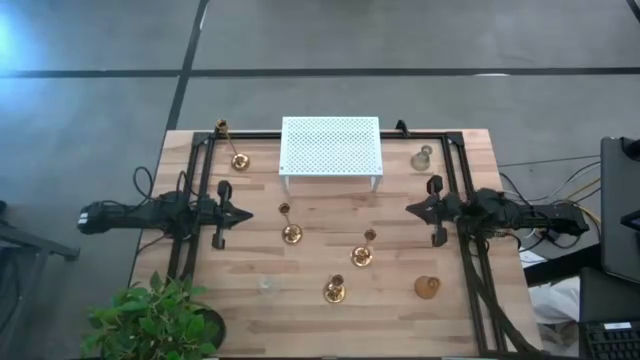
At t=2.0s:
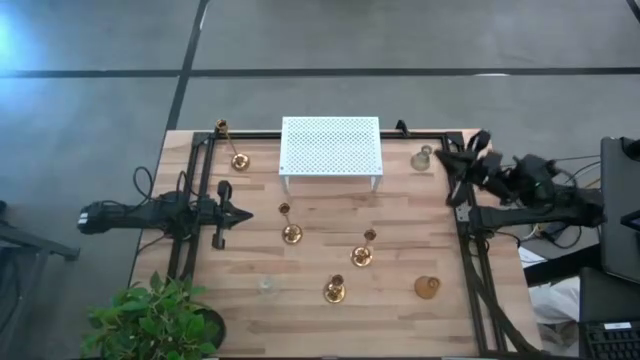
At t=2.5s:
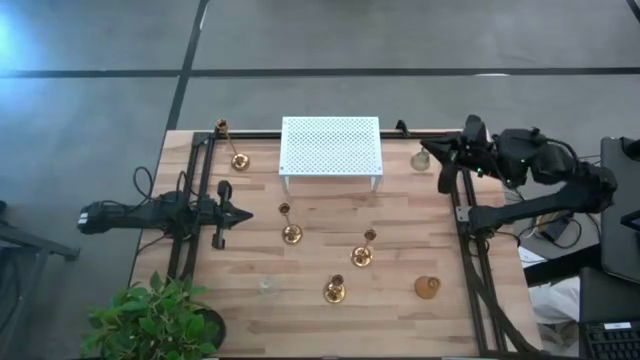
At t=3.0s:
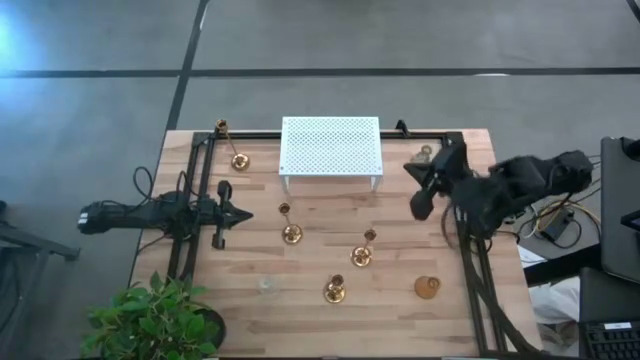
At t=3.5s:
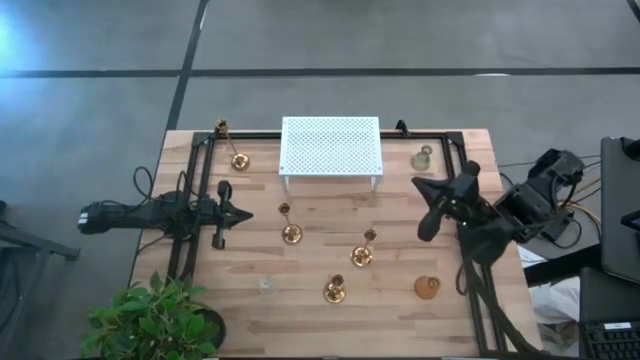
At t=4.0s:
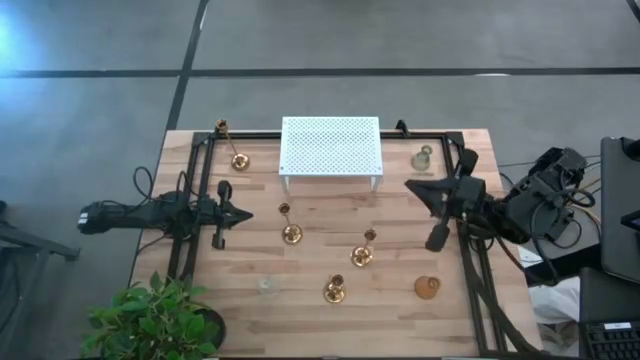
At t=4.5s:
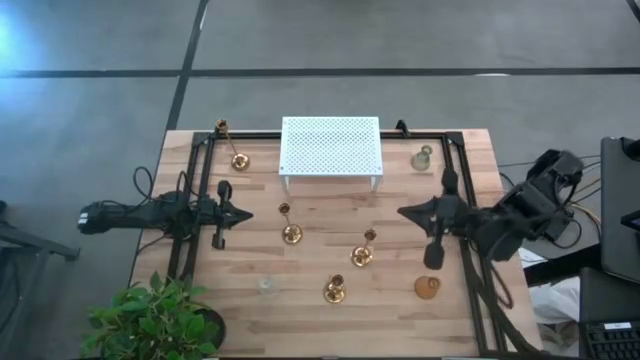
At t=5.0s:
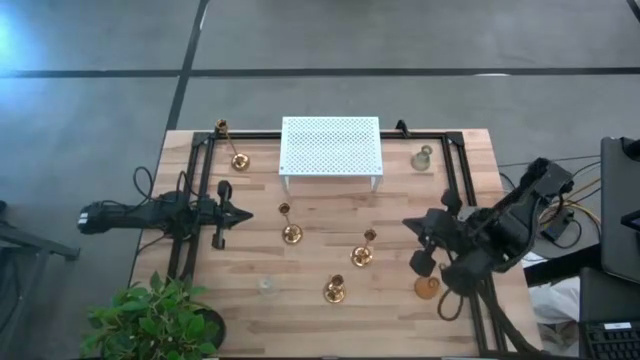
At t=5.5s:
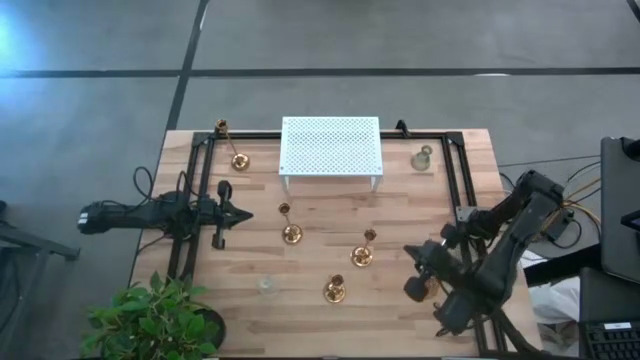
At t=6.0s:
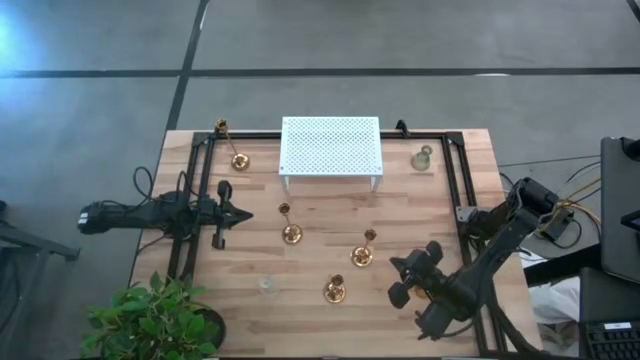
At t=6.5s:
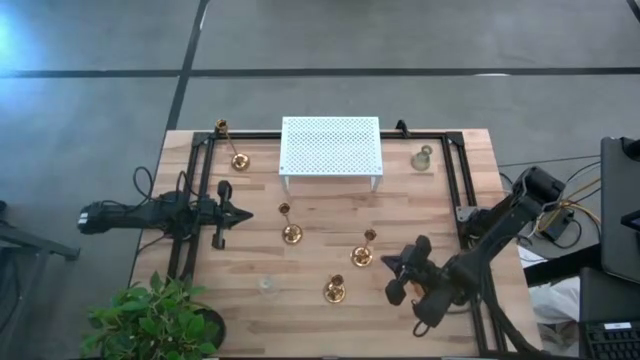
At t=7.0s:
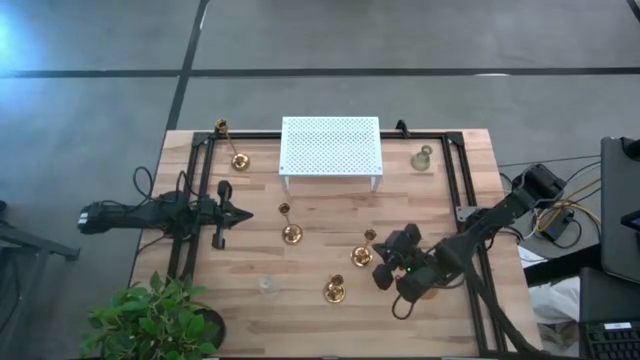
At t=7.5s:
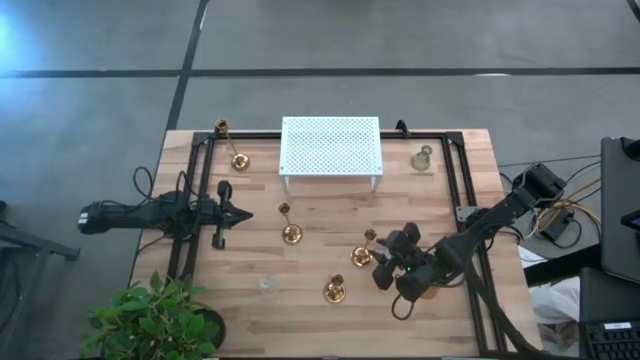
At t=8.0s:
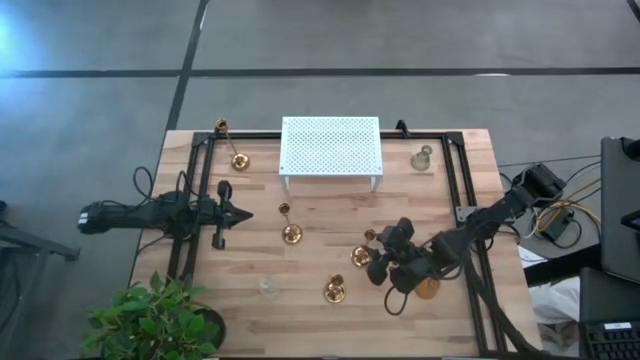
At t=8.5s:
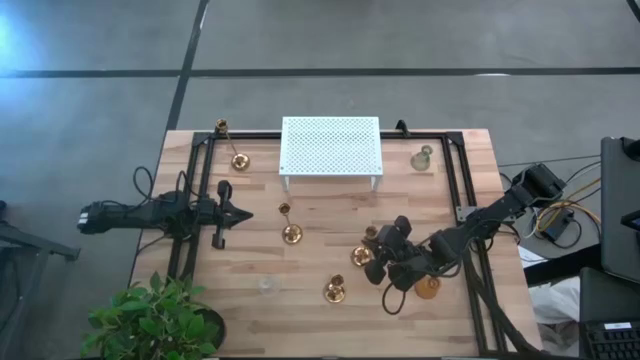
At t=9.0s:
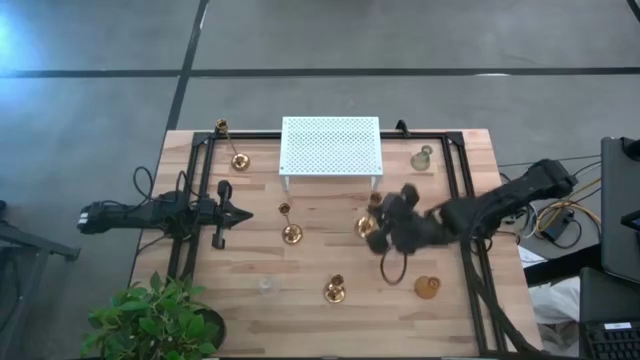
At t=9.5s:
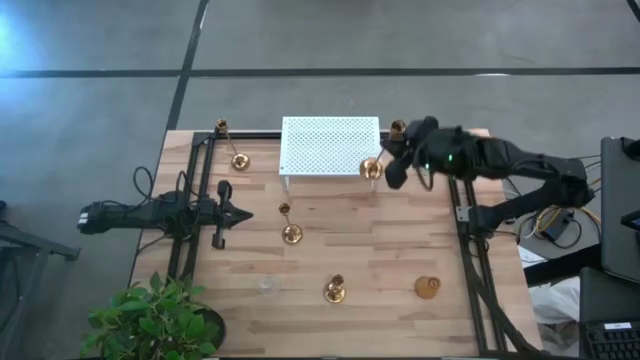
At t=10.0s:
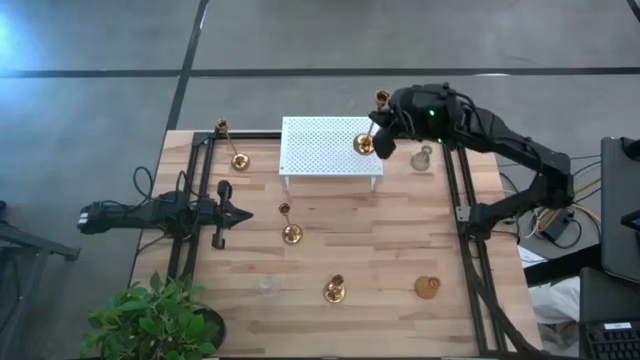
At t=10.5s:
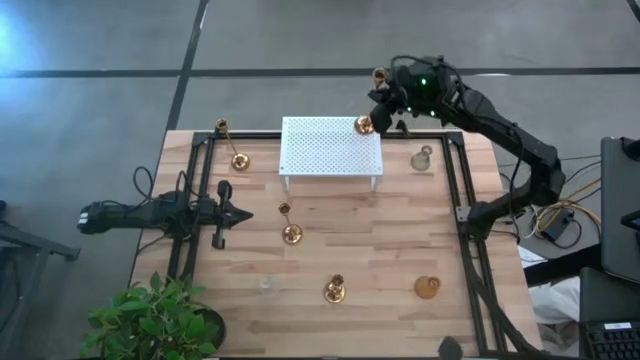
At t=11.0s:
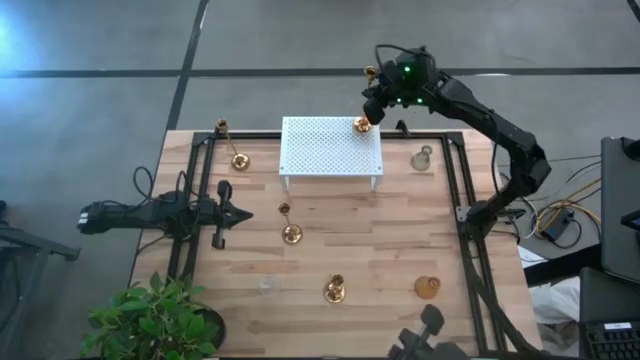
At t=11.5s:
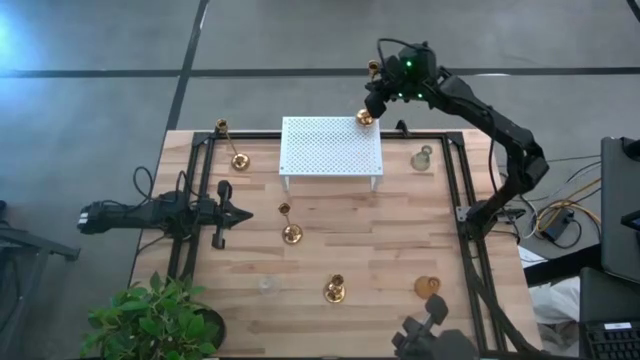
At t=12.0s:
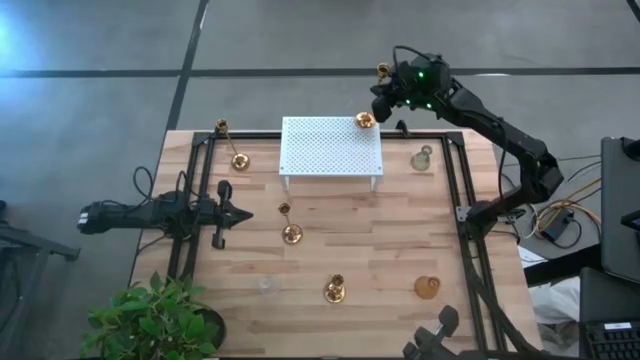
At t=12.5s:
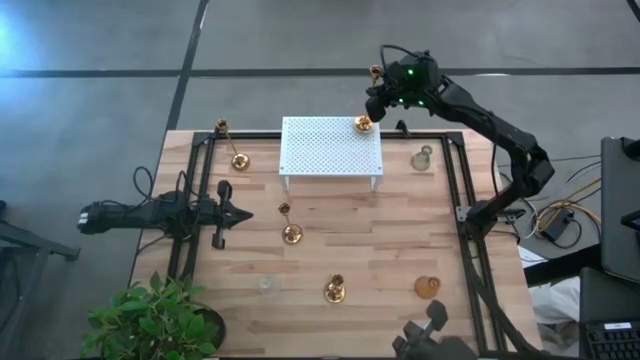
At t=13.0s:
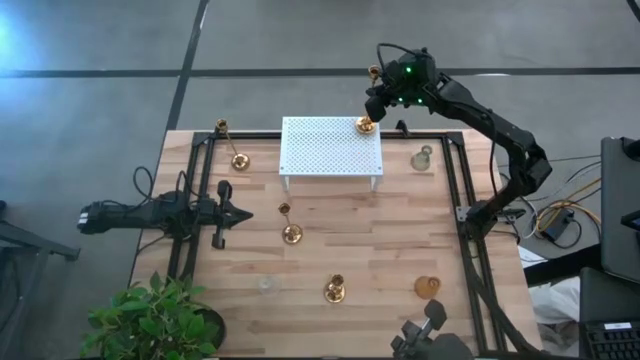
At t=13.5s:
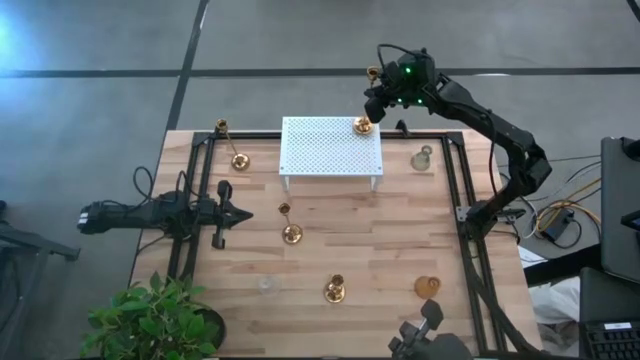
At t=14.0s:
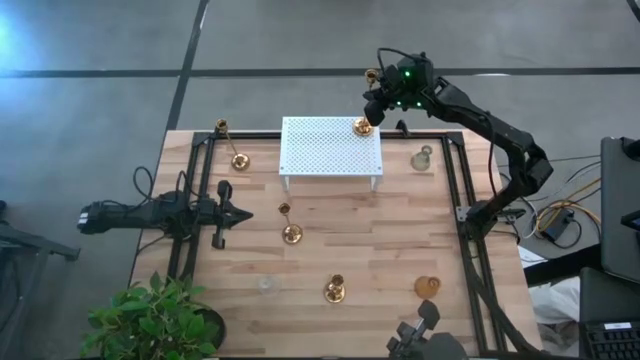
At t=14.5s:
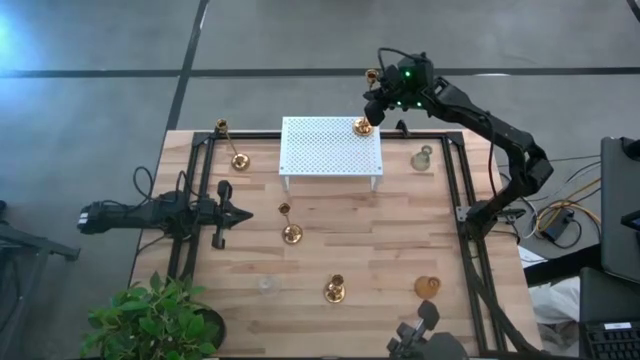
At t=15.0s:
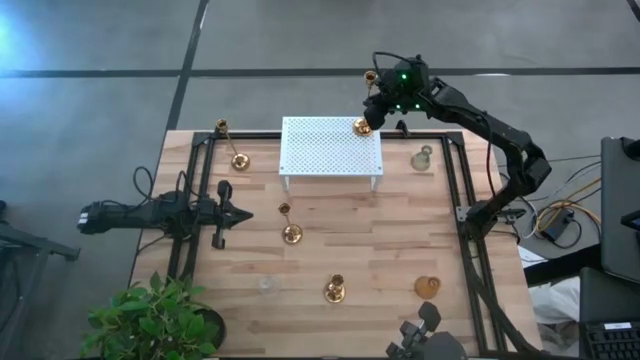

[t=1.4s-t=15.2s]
Task: Pick & Place candle stick holders
Put the gold candle holder on the shelf

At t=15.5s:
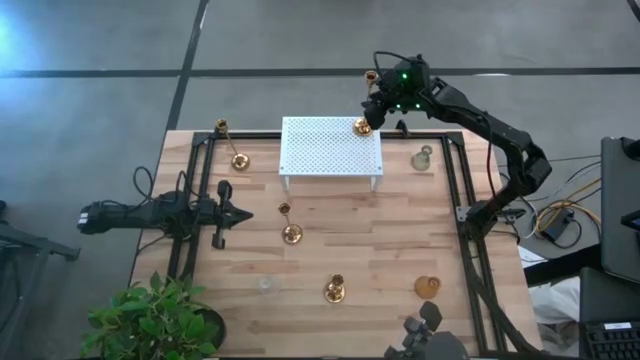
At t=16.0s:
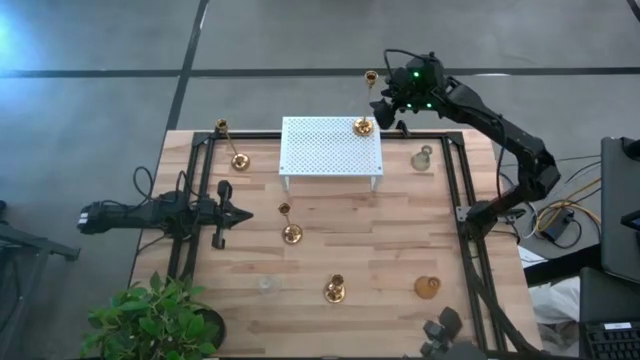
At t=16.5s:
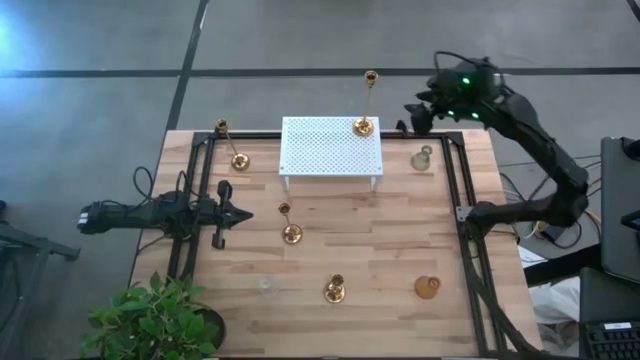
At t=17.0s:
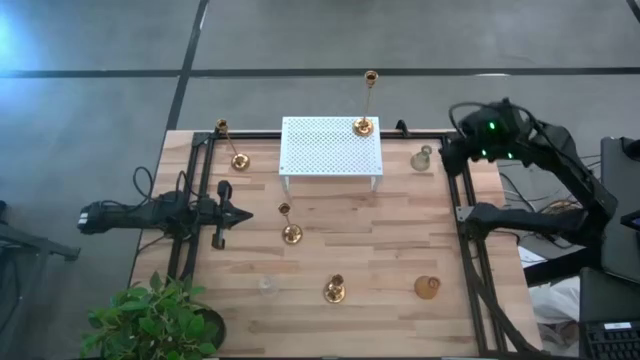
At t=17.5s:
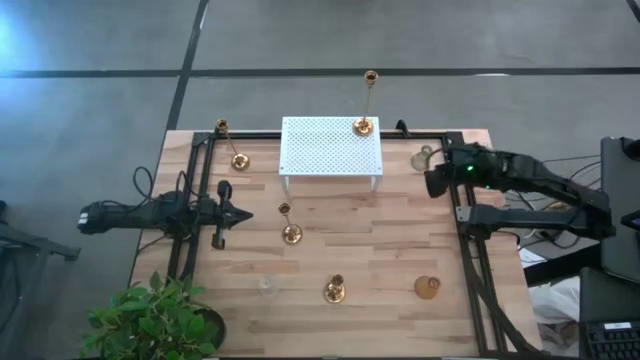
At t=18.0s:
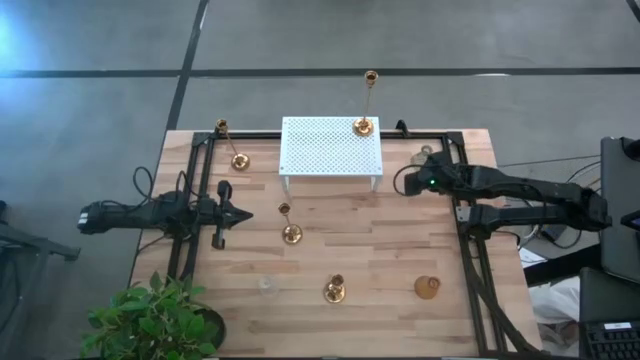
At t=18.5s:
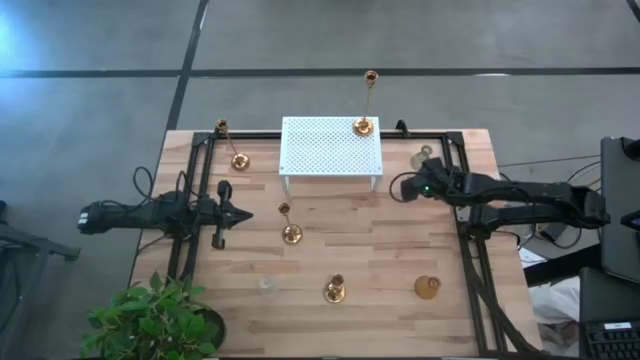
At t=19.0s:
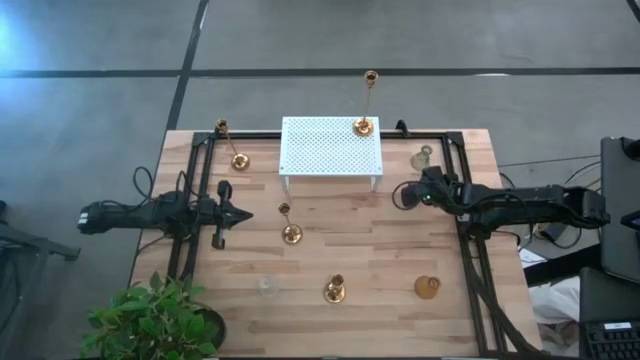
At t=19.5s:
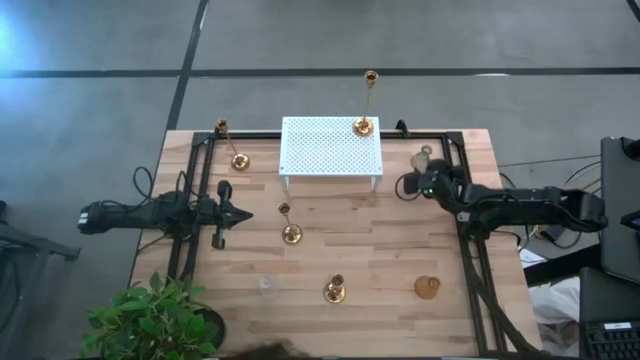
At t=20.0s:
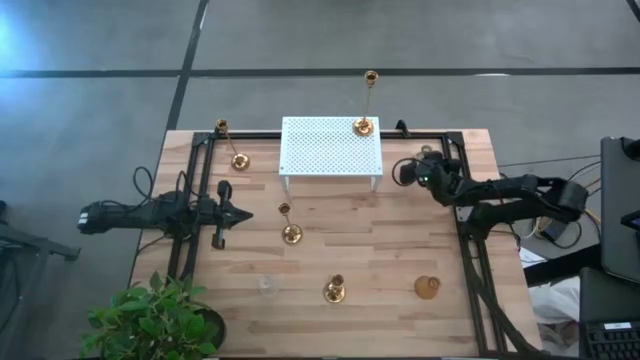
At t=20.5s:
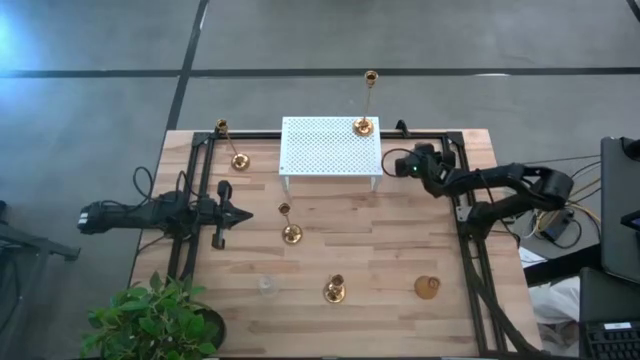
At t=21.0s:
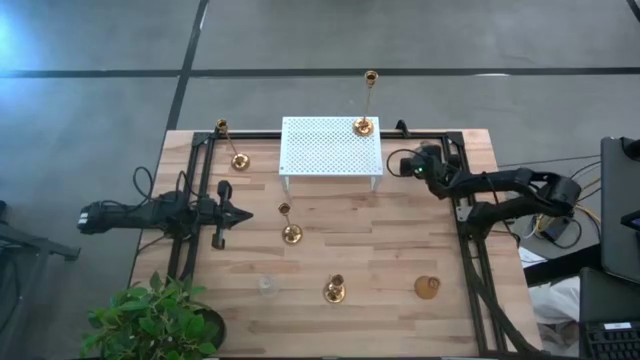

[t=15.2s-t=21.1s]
Put the glass candle holder on the shelf

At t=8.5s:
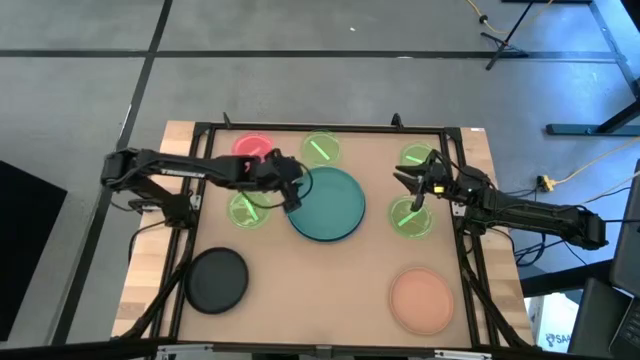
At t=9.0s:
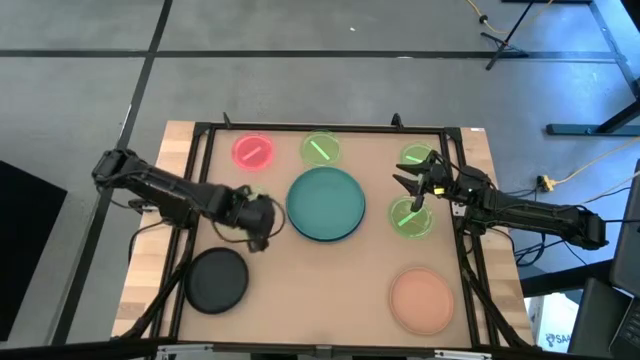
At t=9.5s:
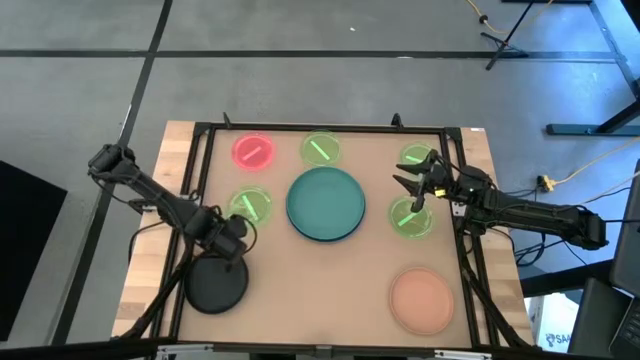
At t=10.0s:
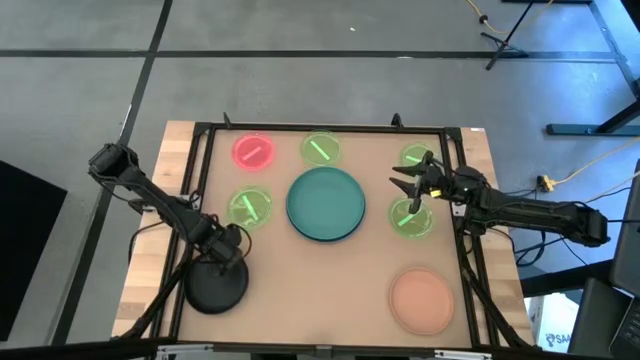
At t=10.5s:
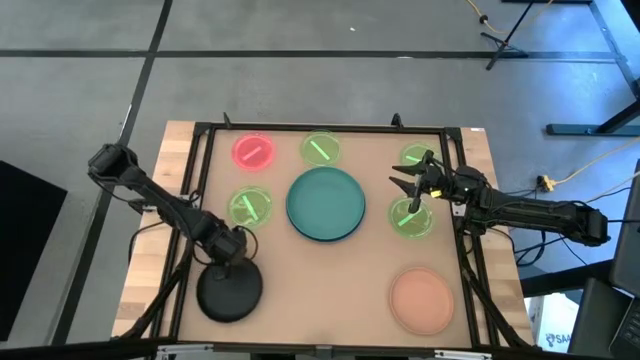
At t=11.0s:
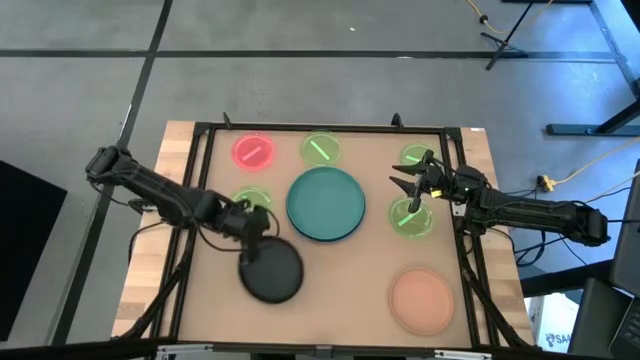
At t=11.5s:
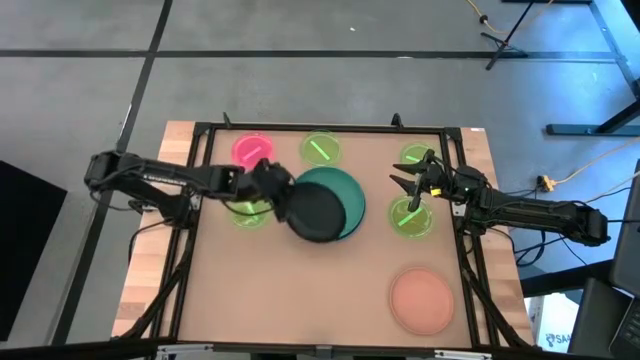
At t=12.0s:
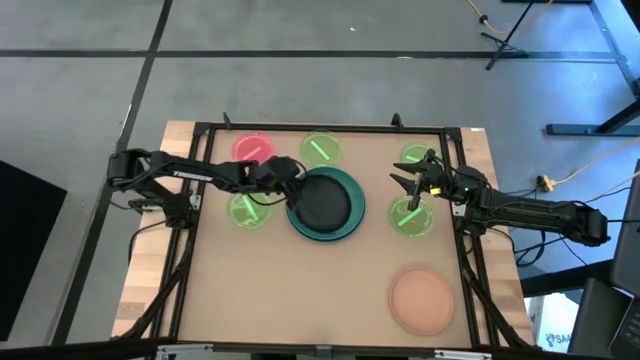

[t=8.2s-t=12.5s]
Task: Stack plastic plates
Stack the black plate on top of the green plate
